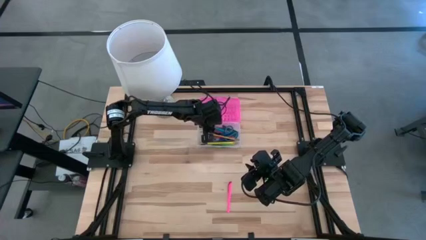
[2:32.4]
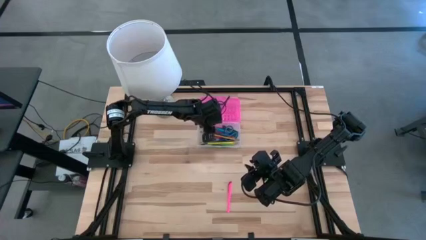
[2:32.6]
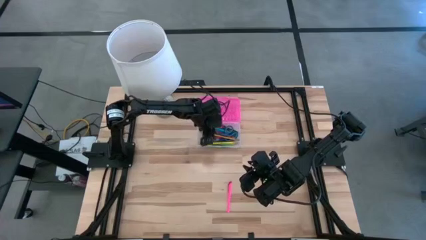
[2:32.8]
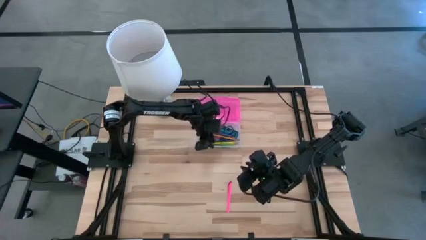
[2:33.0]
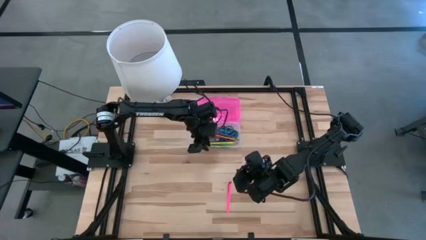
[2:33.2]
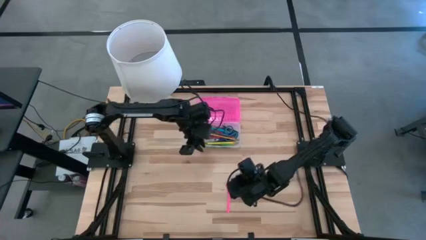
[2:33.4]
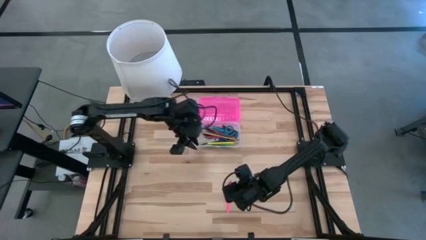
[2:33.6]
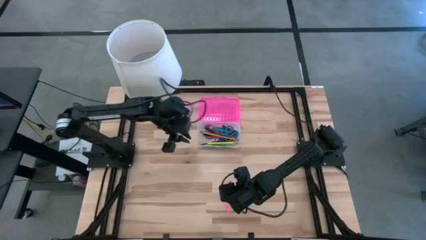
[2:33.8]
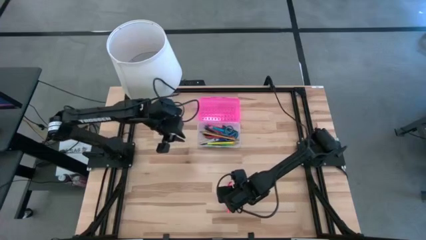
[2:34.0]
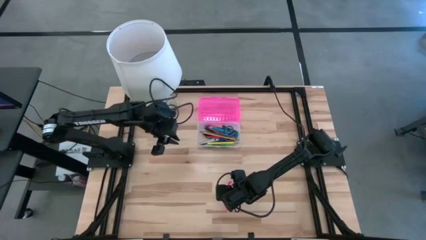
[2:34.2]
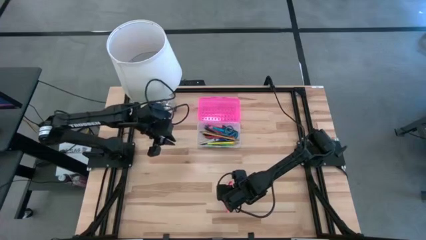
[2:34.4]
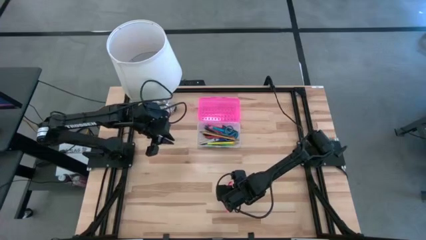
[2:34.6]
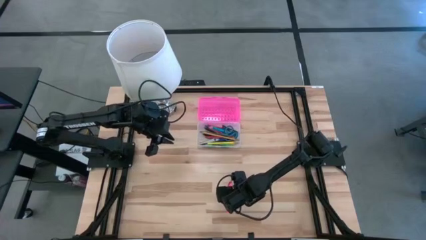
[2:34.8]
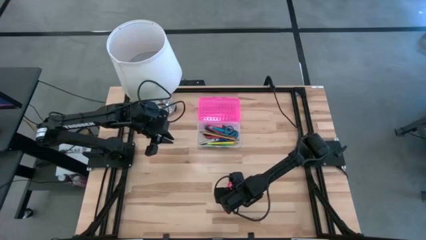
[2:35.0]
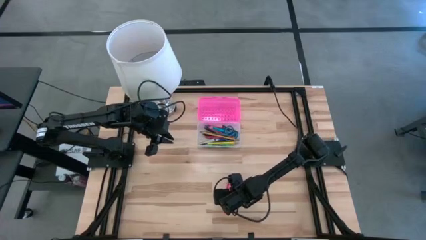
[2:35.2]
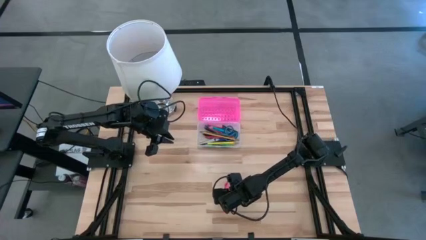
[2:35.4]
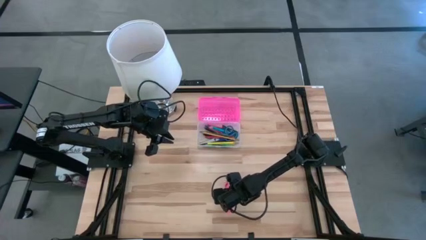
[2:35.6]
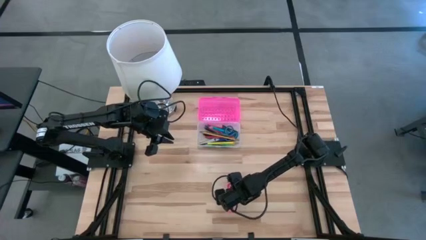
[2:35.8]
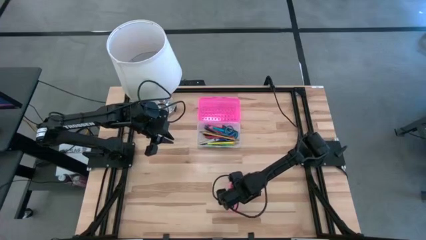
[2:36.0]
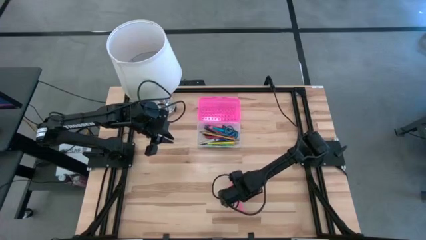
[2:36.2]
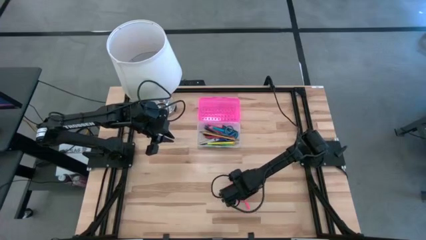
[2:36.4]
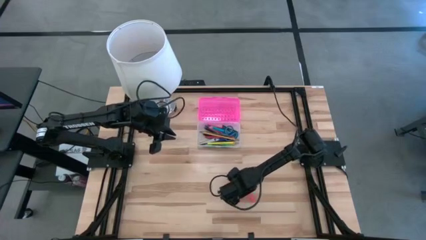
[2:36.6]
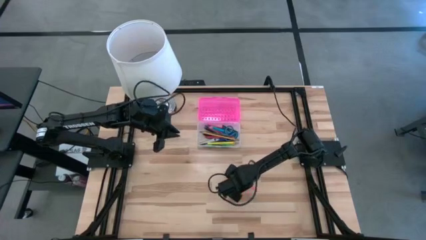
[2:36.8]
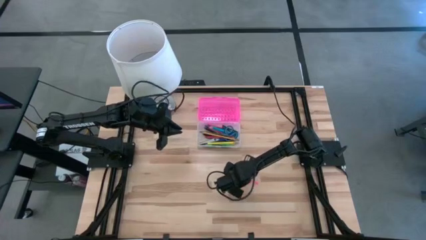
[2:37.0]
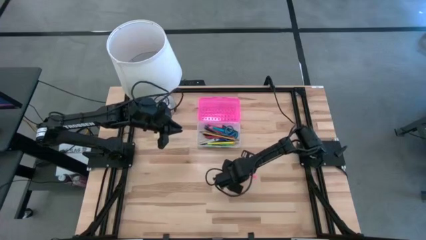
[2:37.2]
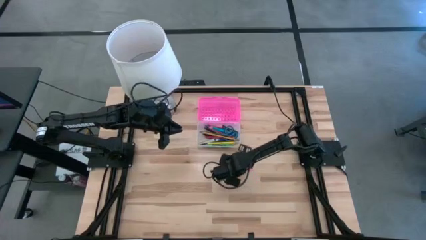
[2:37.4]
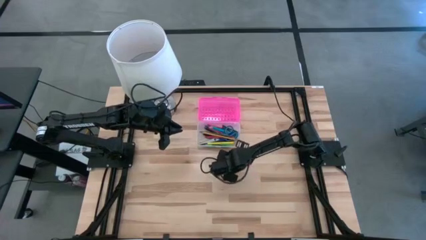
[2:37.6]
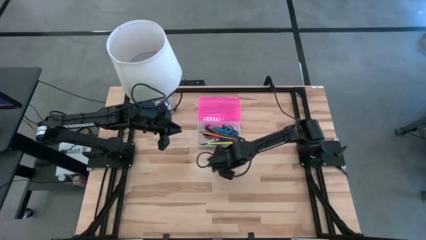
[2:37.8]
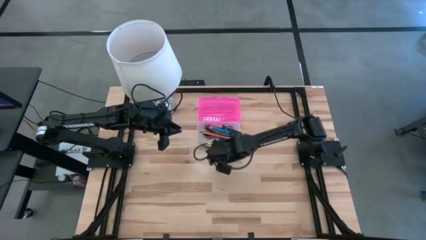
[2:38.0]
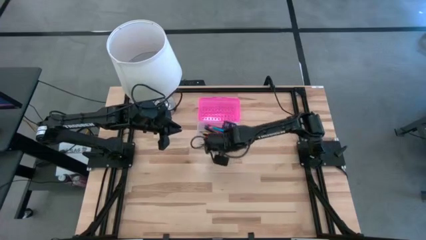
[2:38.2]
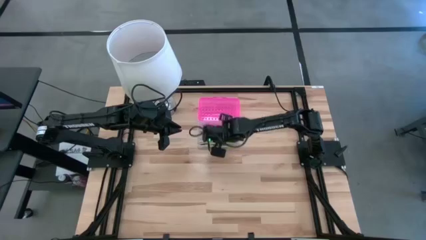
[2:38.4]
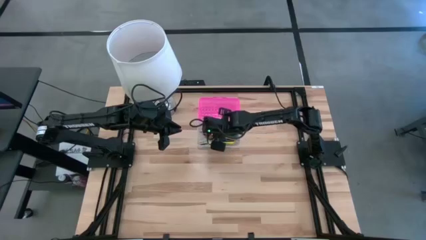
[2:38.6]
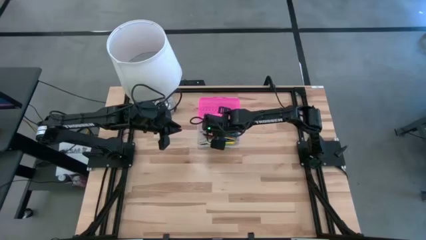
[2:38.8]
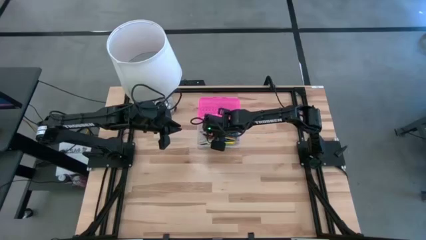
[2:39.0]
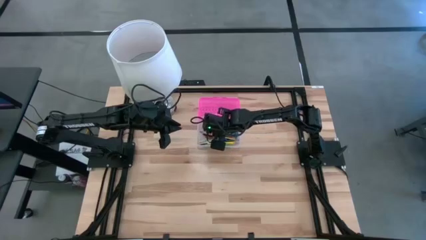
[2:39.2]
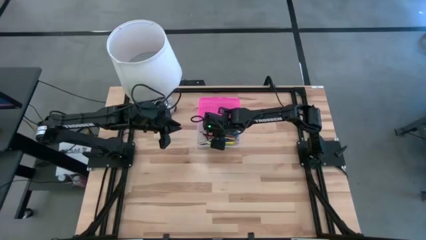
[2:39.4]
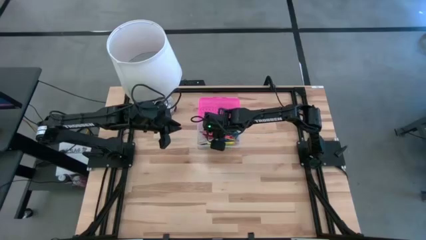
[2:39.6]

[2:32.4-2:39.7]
Task: Pick & place school supplies into a supply box
Put the pink highlighter into the pink supply box

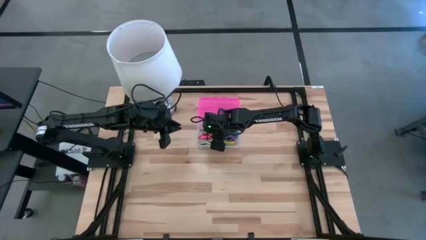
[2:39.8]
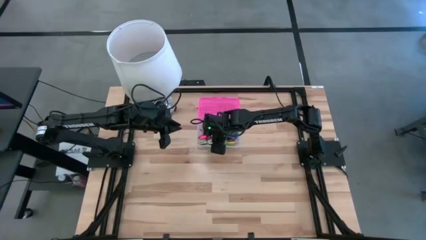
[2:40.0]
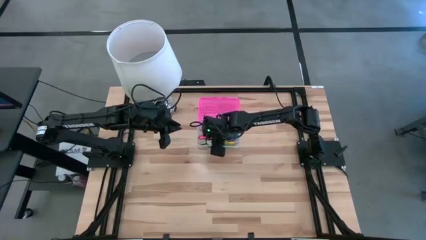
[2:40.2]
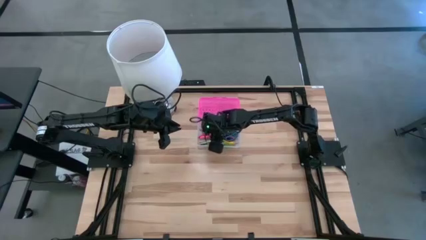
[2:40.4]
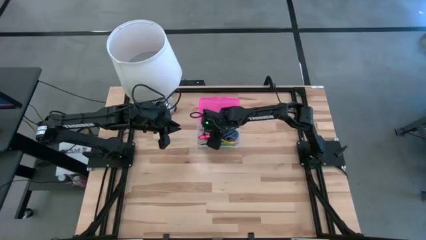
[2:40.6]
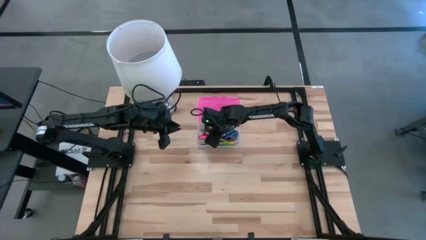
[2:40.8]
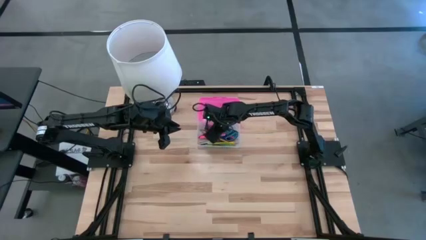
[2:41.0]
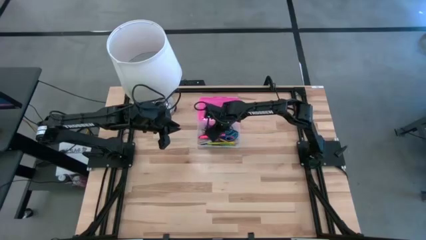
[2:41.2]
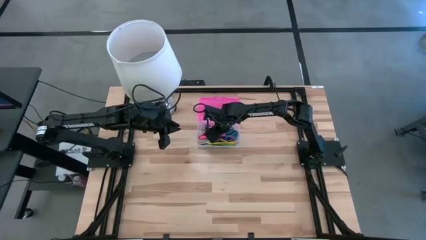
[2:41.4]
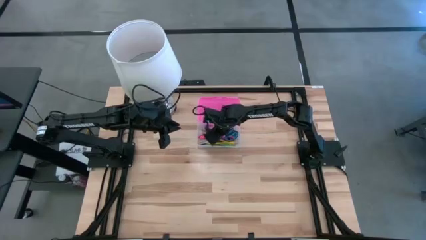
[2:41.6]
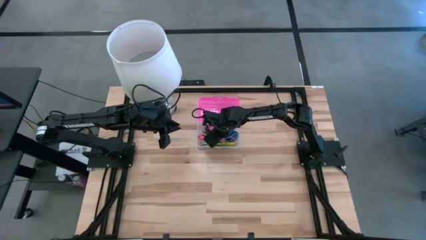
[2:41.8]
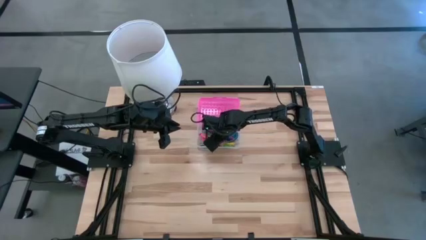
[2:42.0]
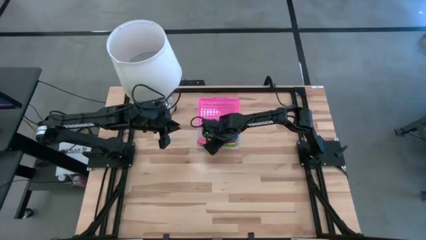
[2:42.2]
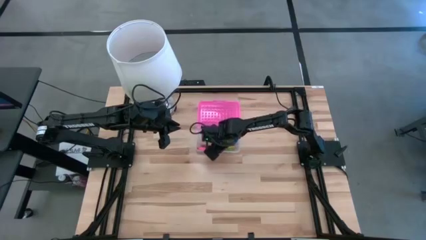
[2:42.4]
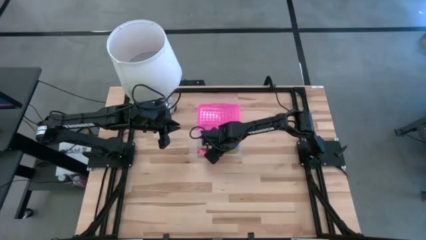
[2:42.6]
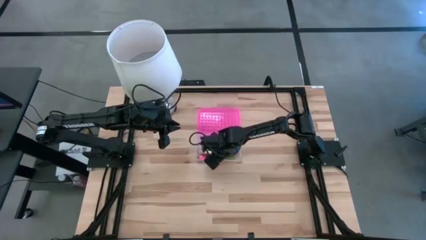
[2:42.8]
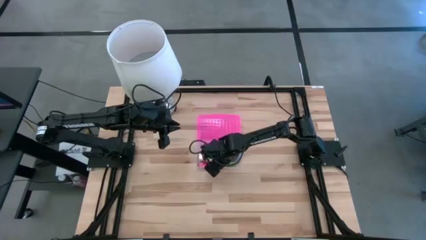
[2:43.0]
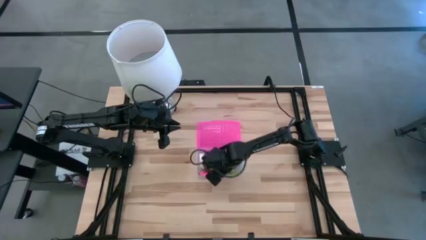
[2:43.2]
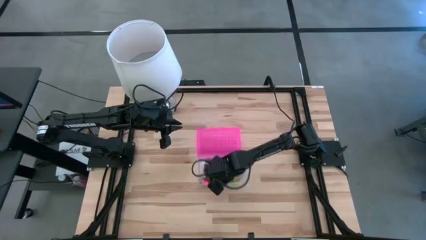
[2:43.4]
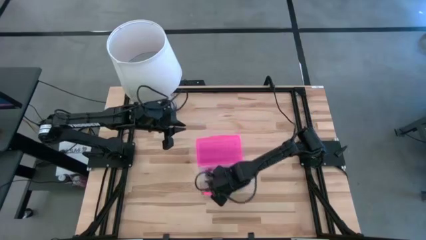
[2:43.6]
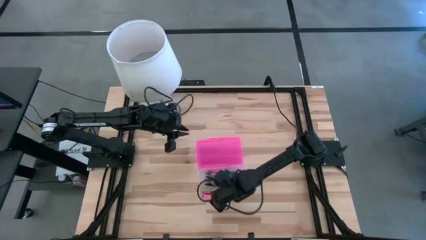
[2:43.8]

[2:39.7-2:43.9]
Move the pink supply box to the middle of the table

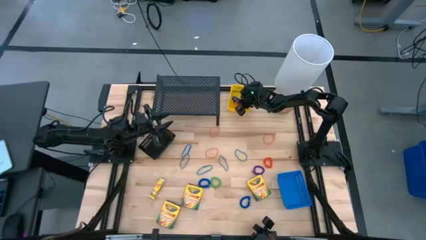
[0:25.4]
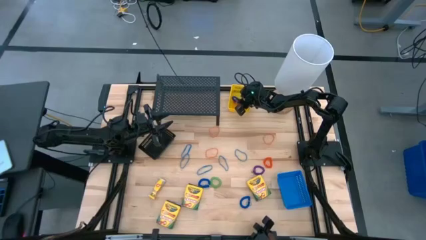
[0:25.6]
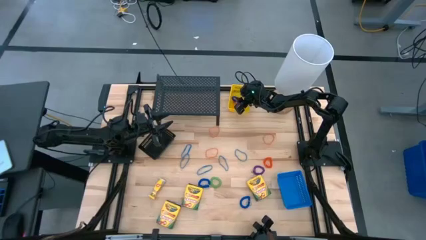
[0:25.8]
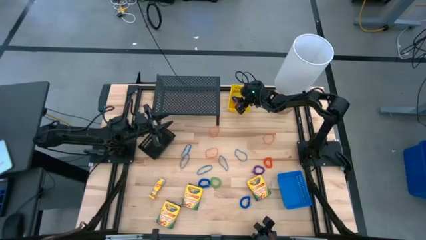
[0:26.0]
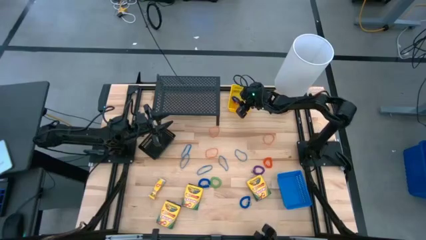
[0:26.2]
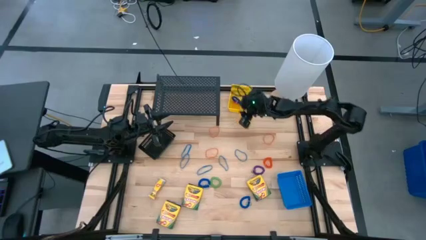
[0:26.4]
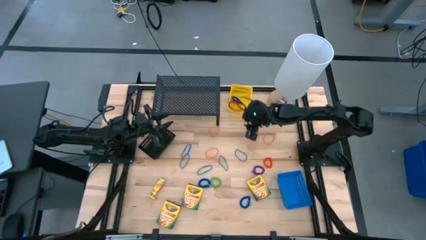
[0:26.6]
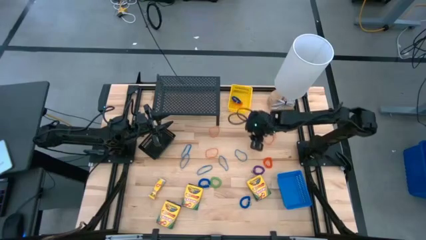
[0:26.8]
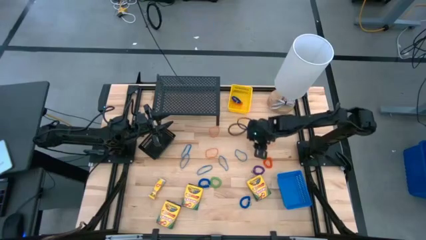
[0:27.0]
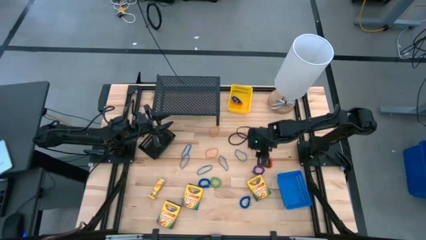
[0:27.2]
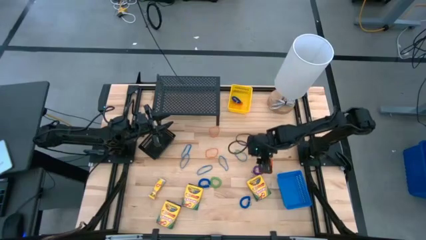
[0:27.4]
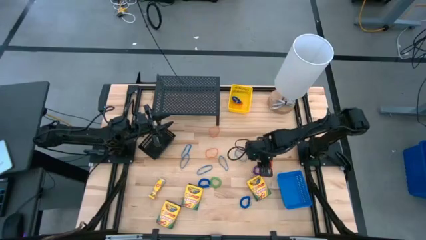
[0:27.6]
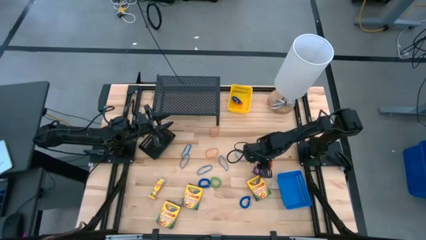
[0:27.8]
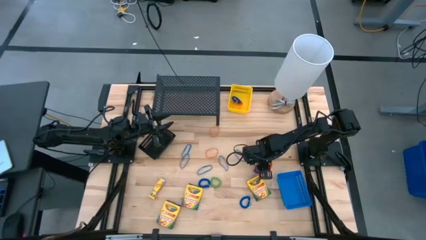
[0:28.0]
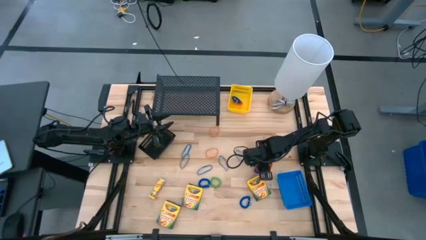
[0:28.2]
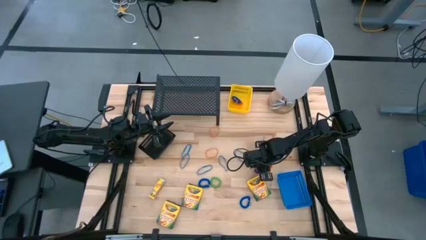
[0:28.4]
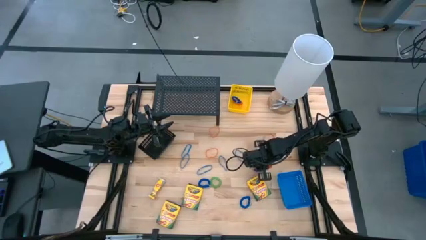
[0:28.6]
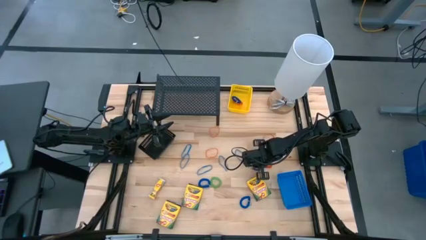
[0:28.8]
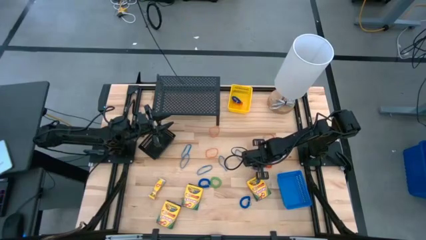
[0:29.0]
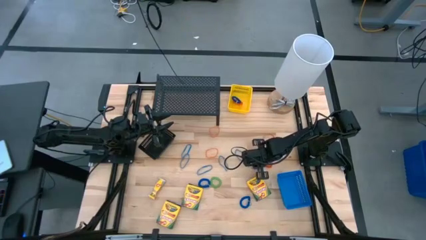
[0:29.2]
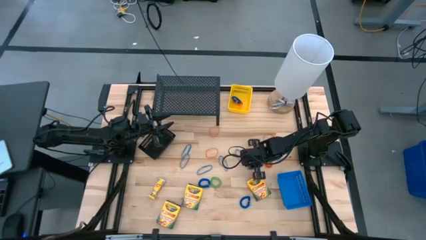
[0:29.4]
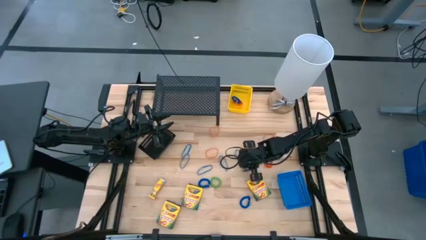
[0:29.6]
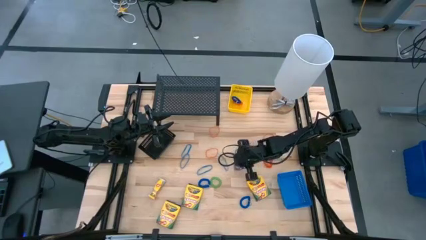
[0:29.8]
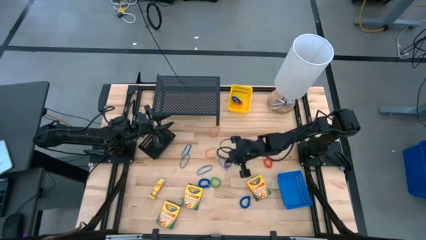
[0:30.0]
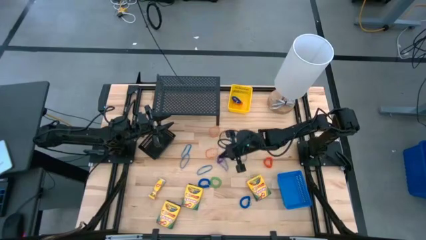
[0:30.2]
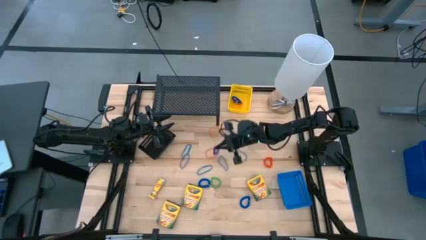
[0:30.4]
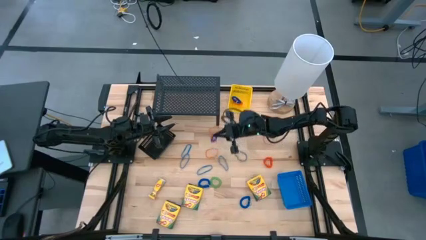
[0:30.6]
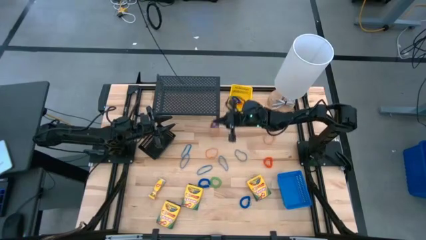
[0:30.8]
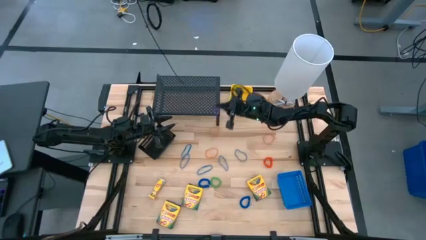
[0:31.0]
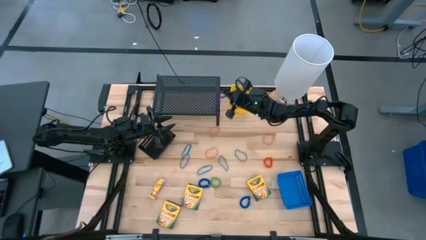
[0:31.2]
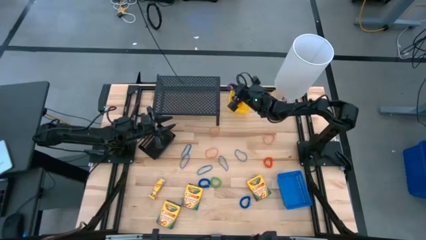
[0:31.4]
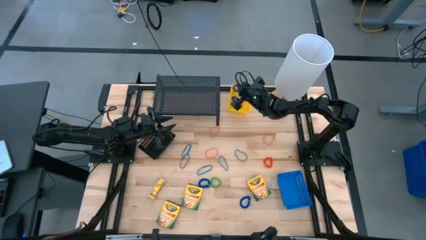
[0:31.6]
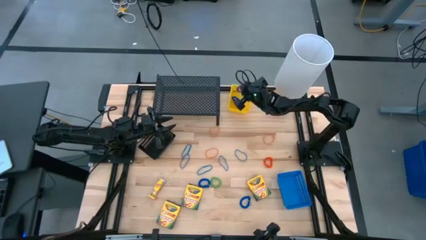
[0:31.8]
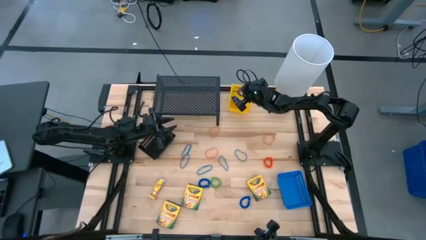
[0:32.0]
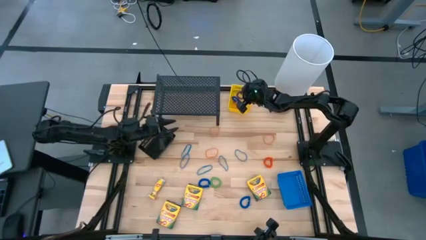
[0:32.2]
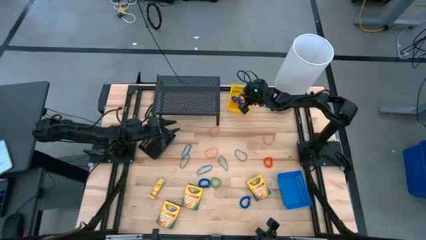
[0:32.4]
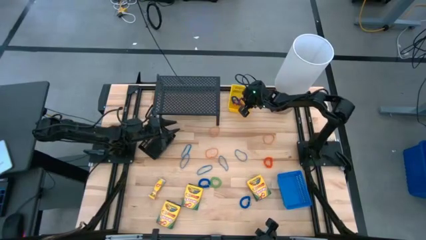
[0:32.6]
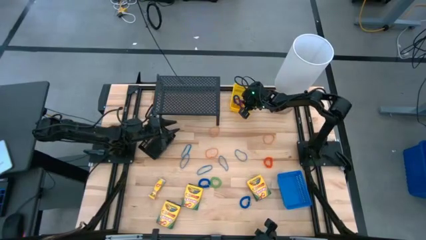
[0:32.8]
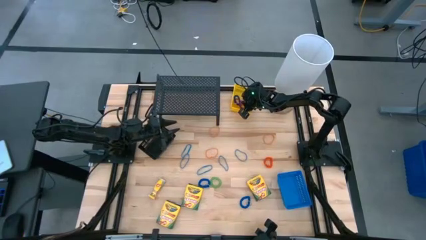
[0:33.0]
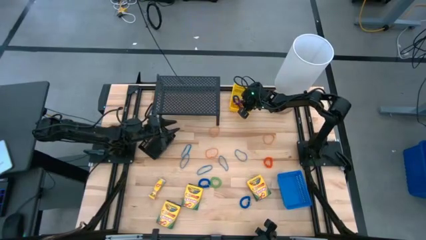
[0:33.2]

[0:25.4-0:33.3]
Task: Pick & Place Office Desk Supplies
Put the purple spring keychain into the yellow bin
